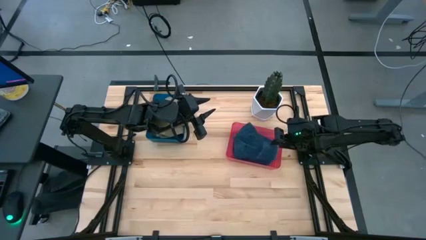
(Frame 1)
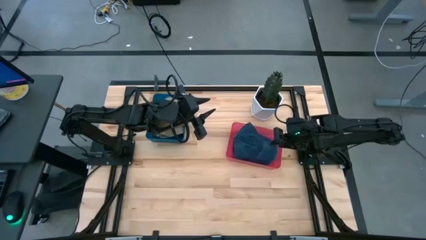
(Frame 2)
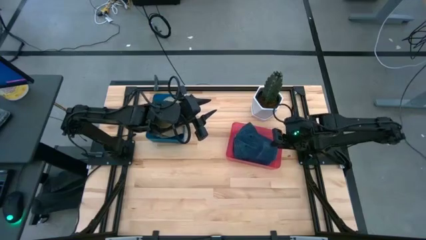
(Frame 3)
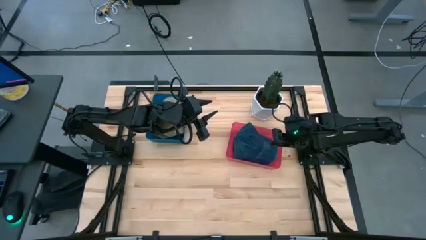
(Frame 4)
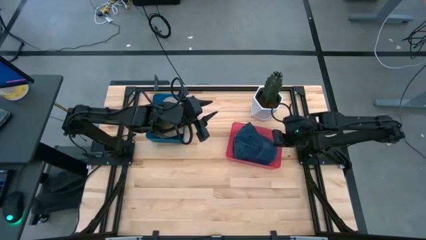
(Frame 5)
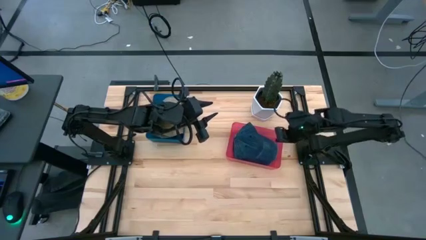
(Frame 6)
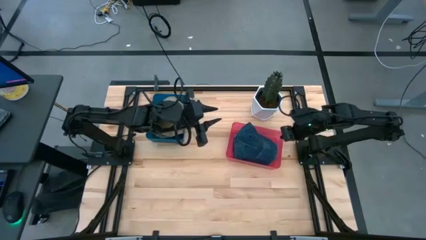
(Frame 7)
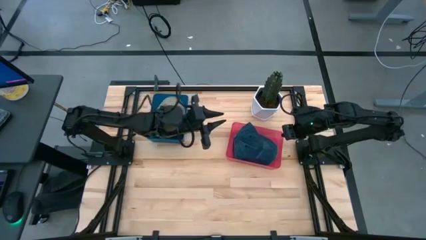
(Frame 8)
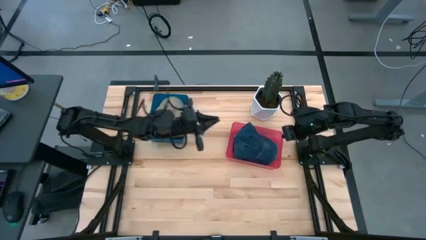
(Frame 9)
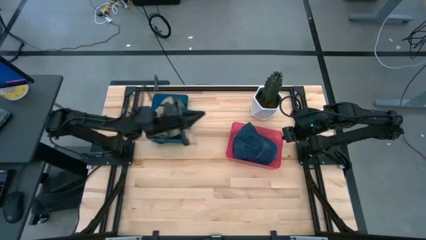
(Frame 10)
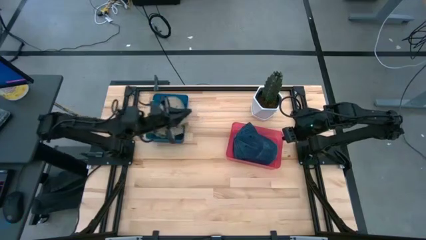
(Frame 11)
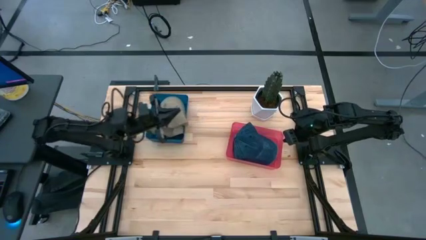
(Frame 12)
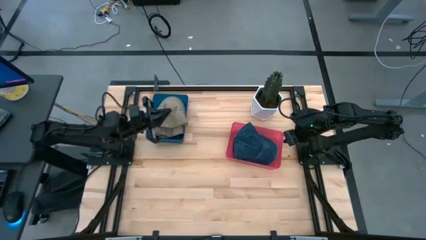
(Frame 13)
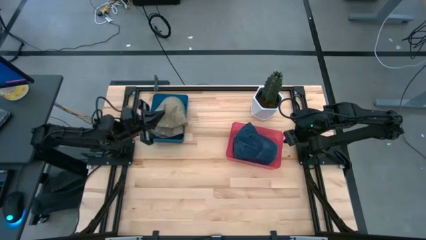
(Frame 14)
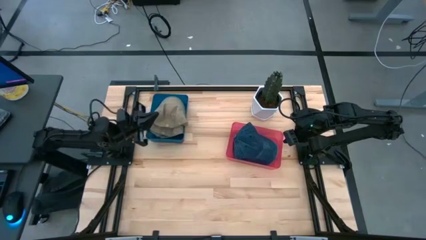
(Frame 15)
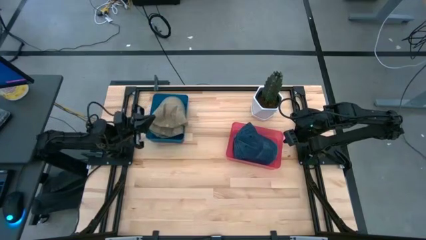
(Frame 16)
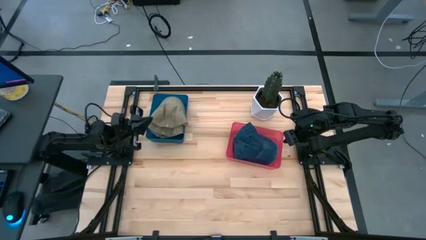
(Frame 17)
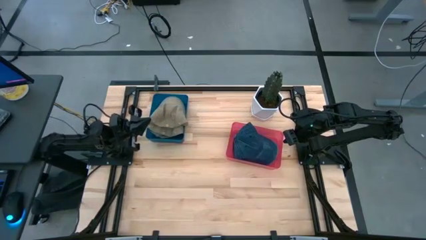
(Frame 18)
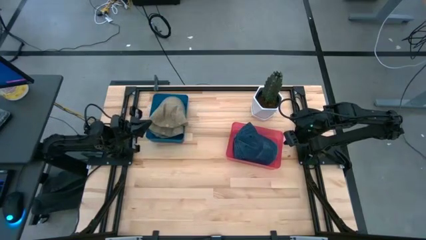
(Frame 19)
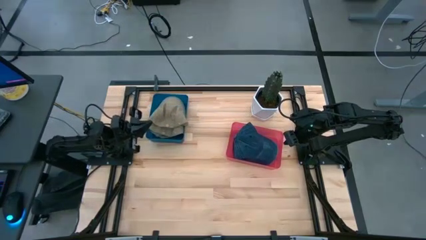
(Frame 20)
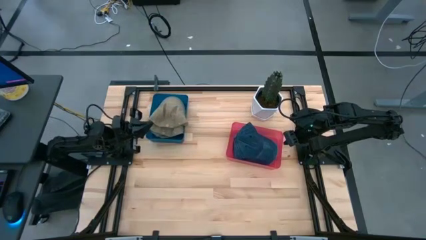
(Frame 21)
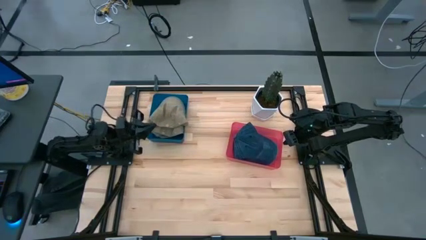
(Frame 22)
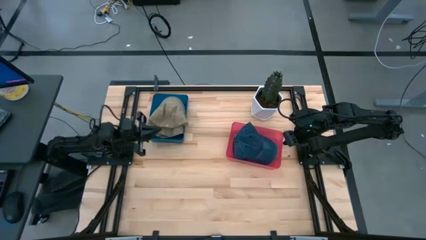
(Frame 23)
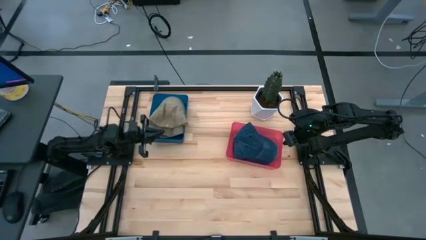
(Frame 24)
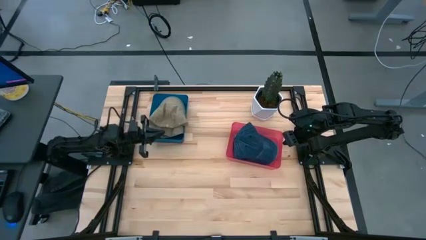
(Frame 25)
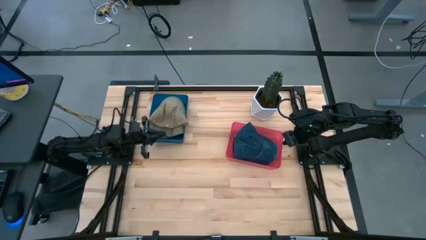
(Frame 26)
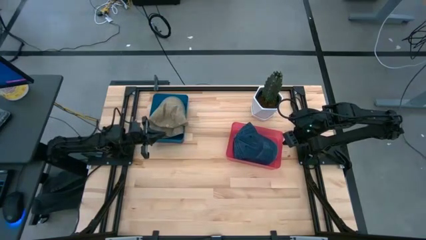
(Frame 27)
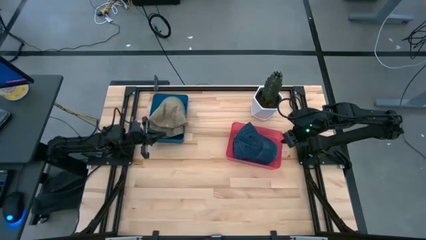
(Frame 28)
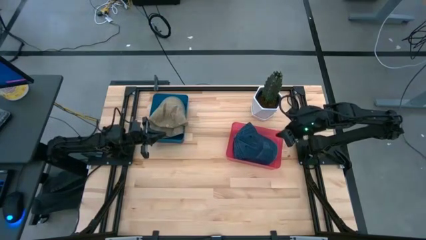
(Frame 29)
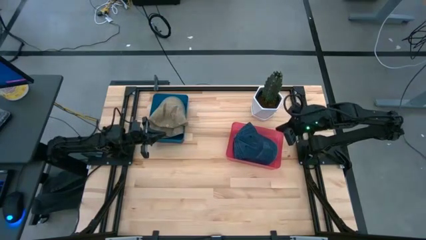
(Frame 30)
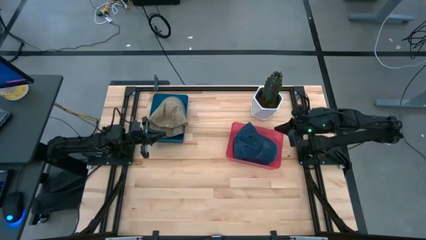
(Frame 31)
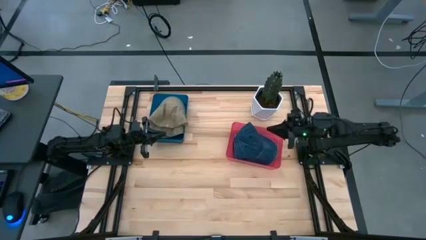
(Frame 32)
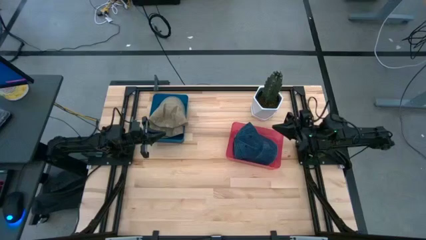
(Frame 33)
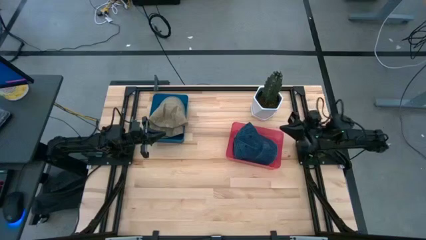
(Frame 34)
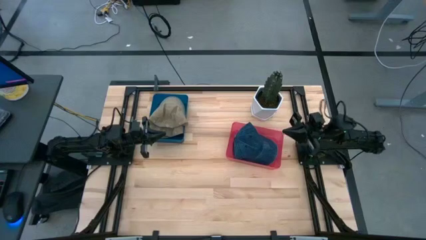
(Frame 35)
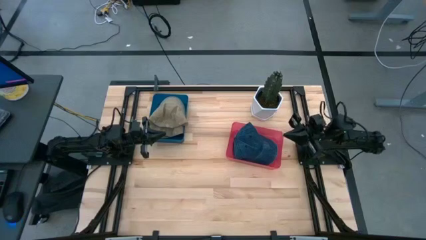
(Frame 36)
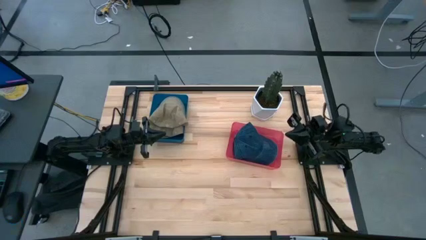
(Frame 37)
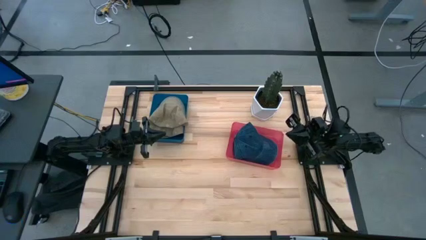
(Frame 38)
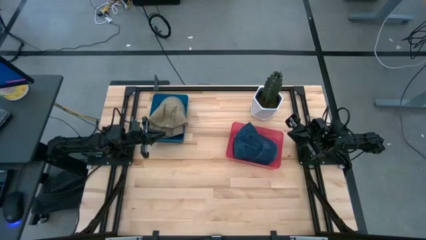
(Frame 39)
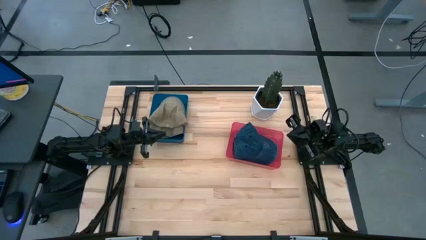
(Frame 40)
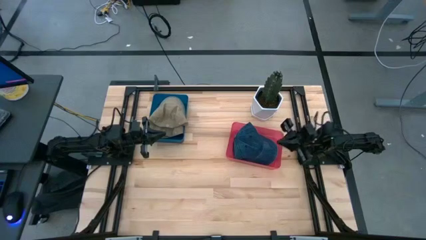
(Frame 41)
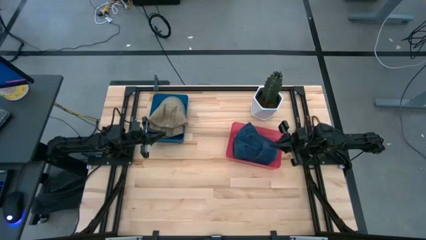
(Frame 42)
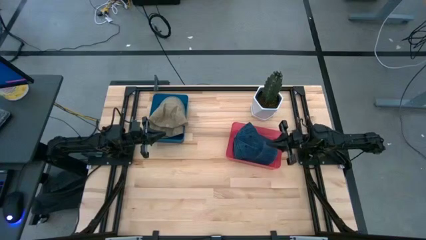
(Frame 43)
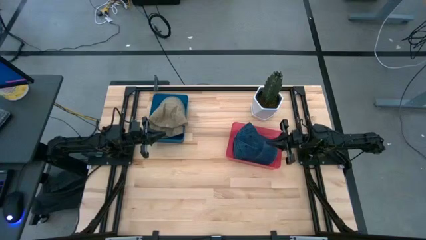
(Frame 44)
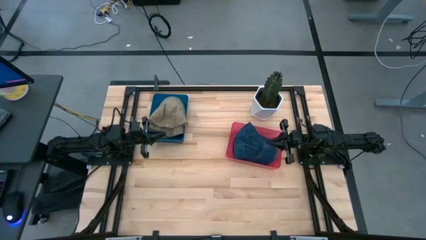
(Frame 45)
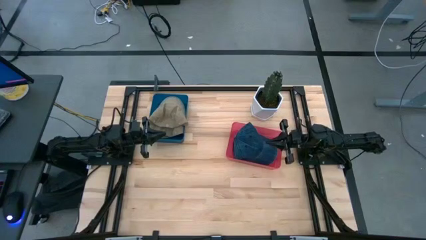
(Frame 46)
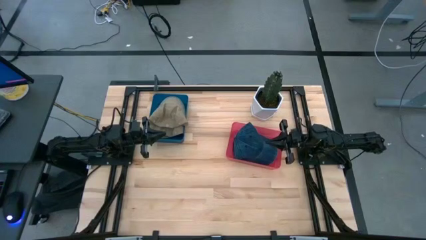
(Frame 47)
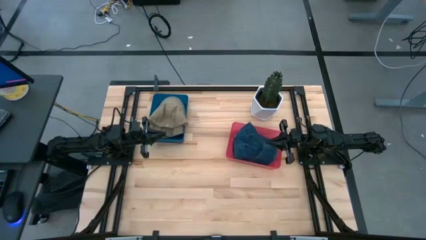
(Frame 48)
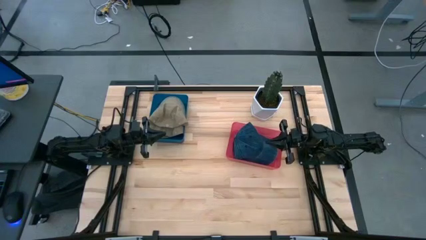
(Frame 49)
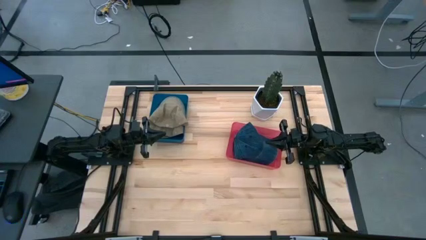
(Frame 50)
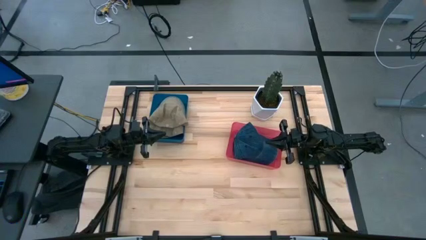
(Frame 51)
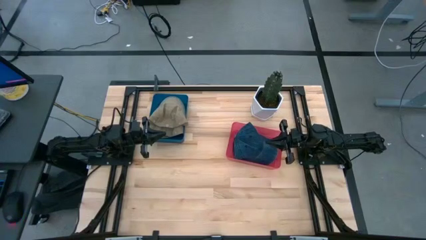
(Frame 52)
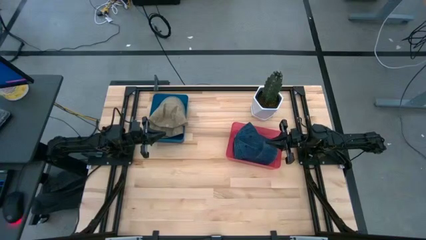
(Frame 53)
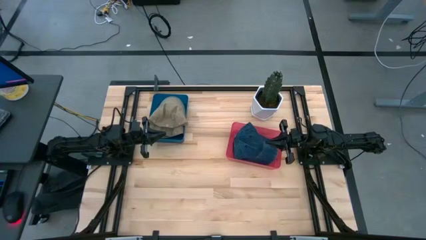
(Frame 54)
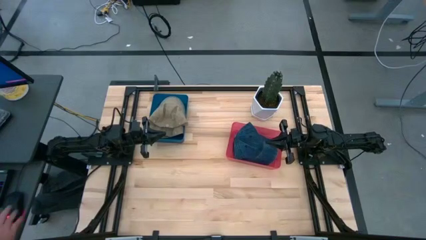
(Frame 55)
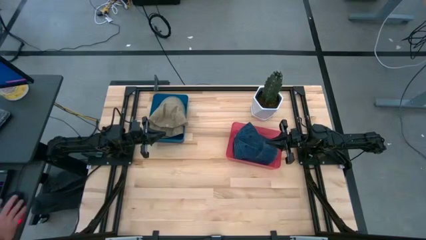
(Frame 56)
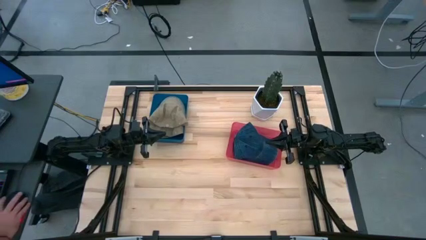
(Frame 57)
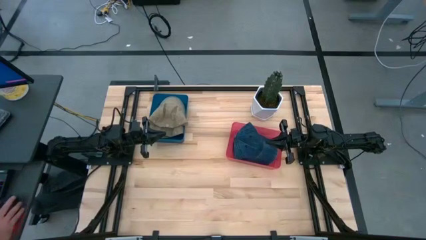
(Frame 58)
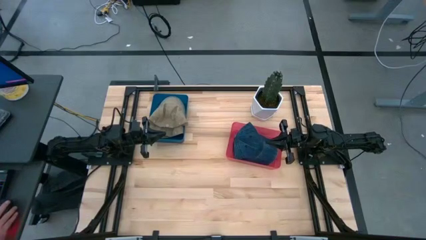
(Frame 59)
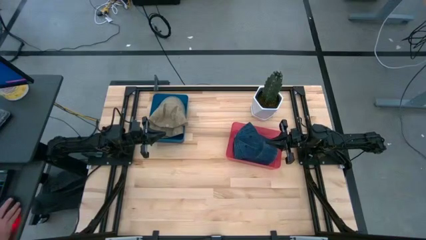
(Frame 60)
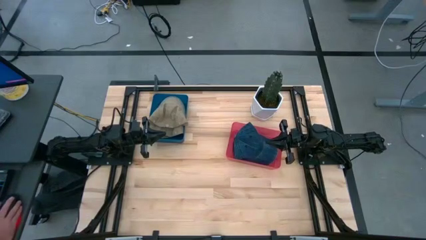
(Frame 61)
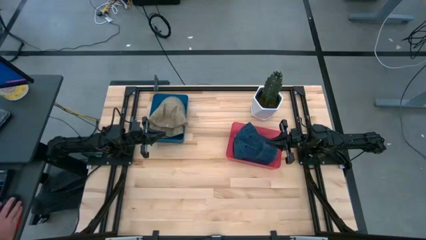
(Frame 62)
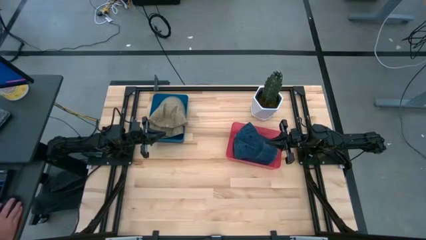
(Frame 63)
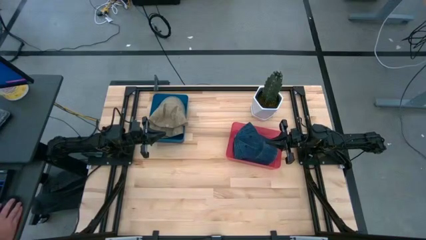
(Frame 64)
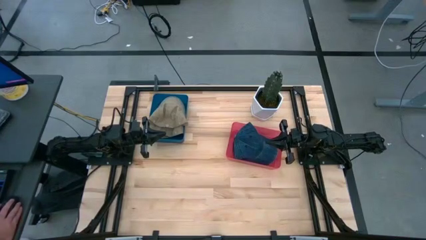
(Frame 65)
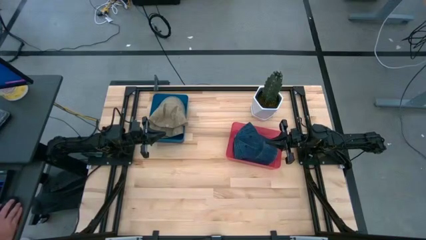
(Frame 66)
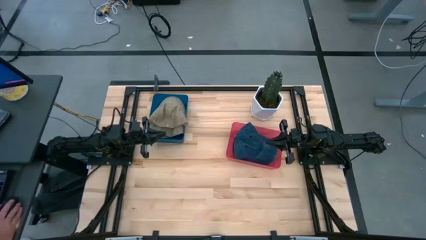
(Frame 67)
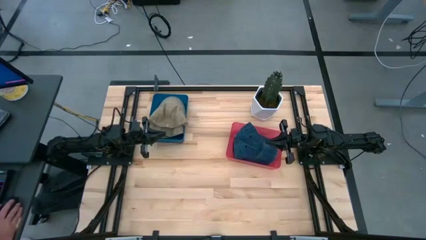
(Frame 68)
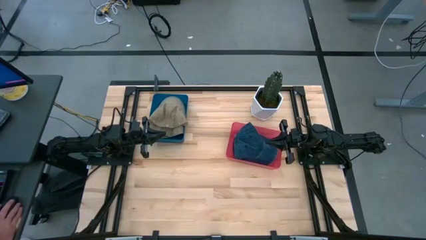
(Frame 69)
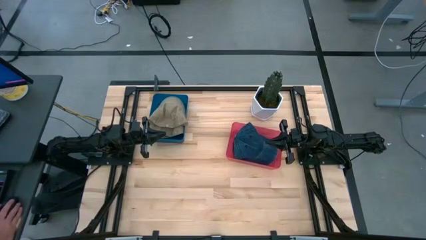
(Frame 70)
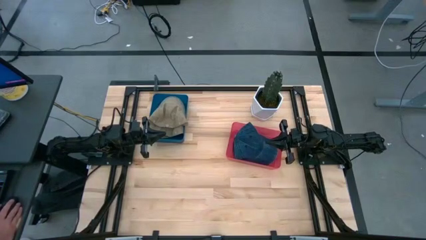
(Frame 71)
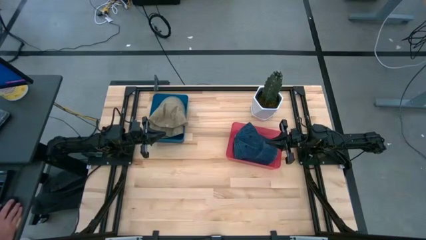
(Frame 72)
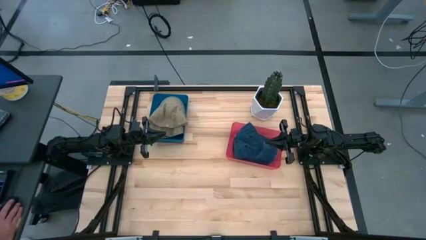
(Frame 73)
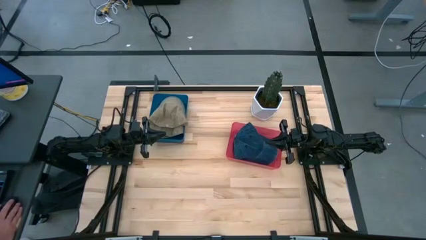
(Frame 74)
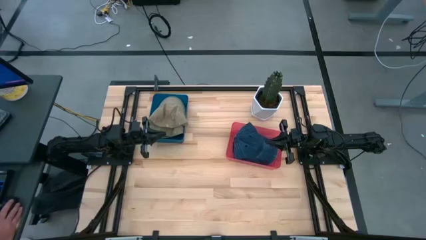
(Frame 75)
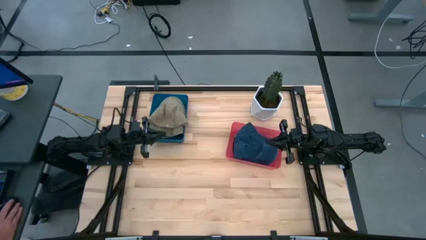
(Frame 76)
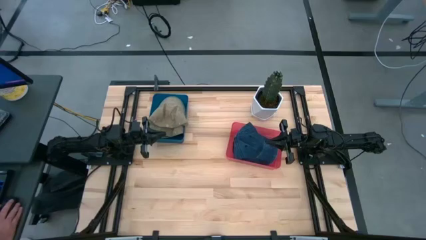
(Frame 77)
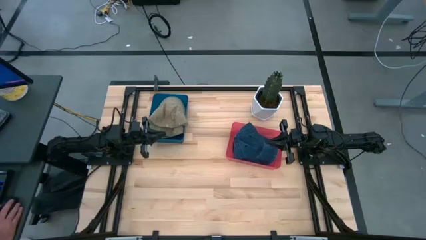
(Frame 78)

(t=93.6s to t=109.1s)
Task: Pick & Place hat
Return to Home Position
